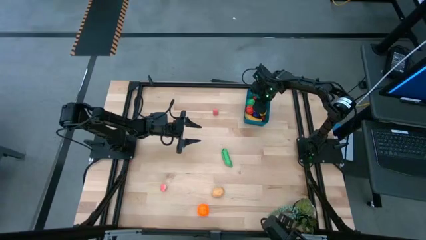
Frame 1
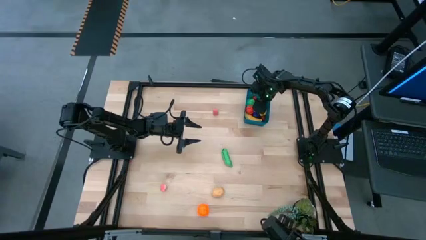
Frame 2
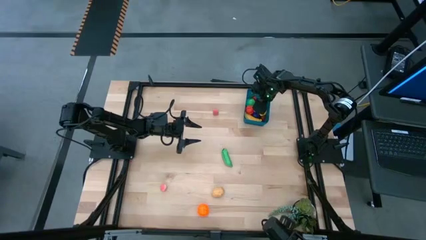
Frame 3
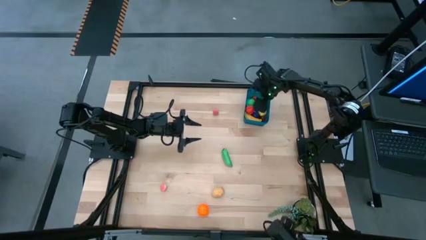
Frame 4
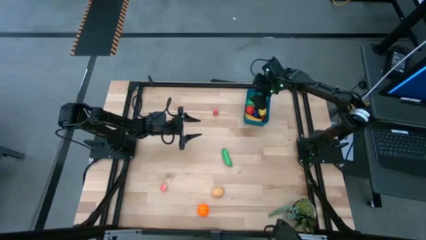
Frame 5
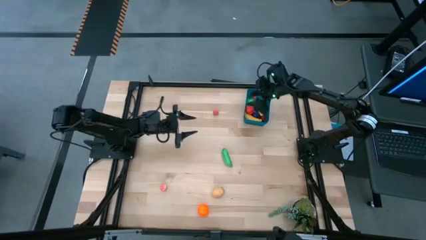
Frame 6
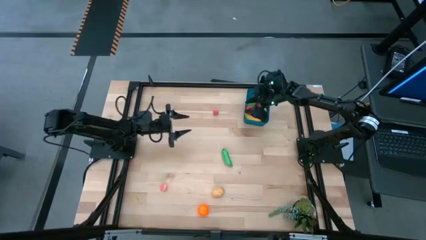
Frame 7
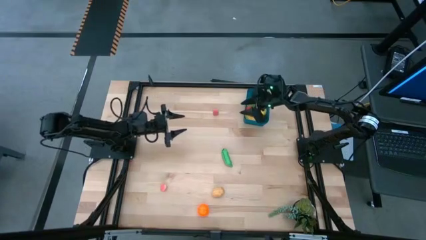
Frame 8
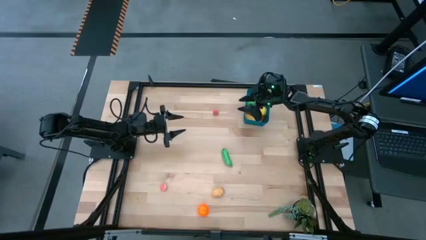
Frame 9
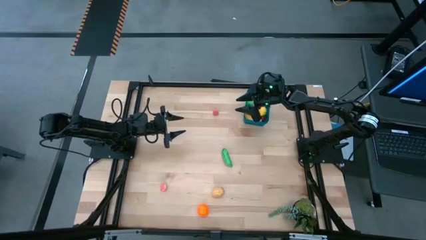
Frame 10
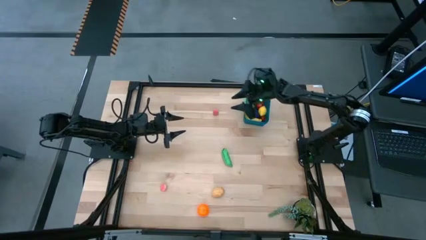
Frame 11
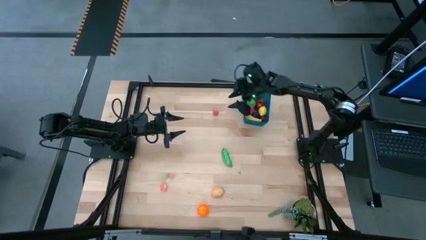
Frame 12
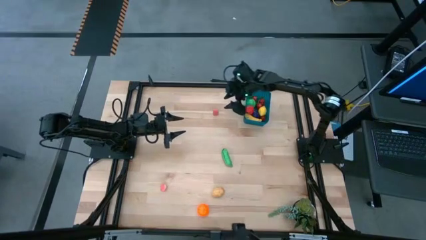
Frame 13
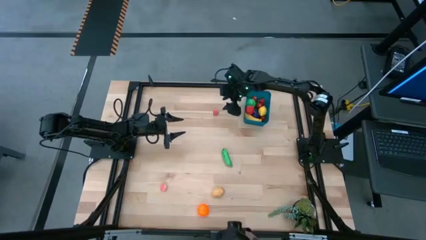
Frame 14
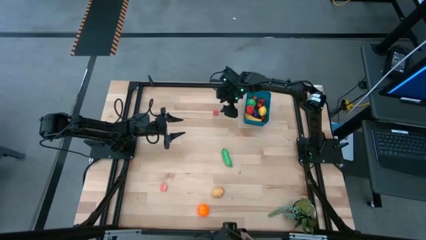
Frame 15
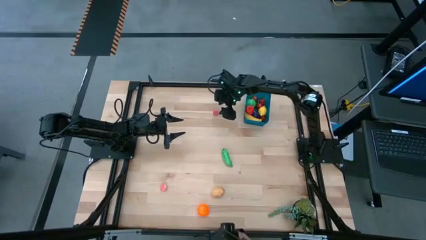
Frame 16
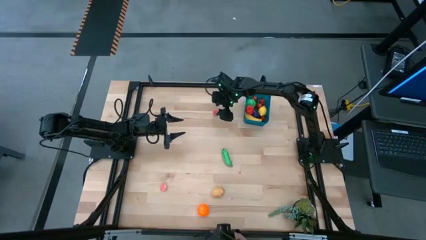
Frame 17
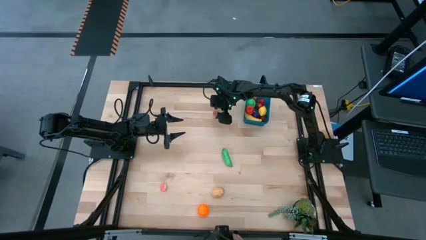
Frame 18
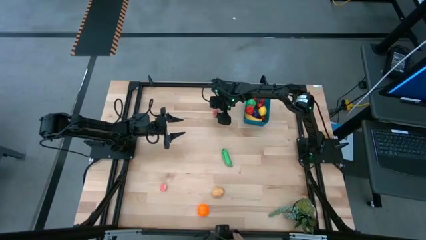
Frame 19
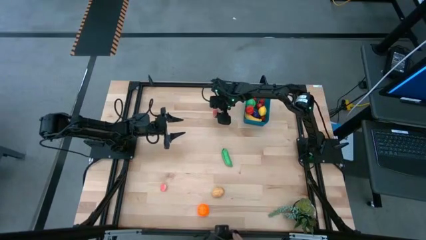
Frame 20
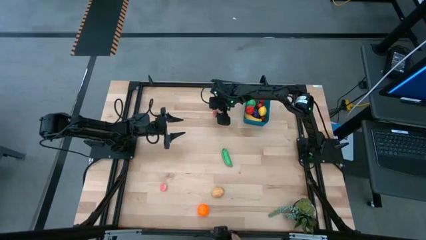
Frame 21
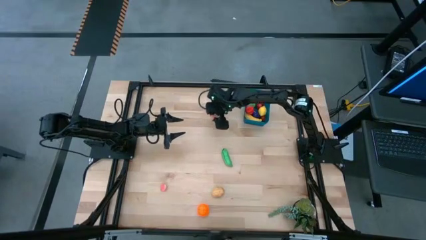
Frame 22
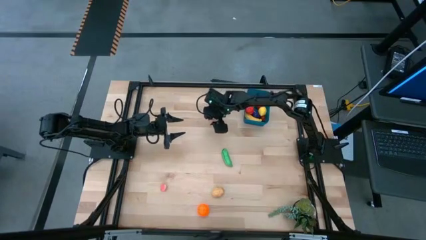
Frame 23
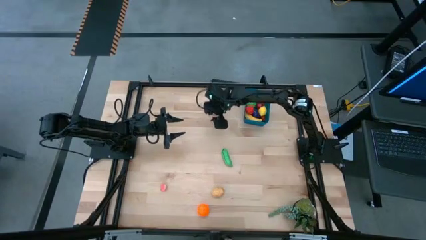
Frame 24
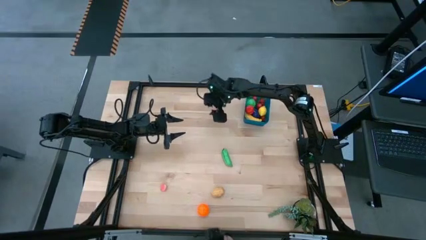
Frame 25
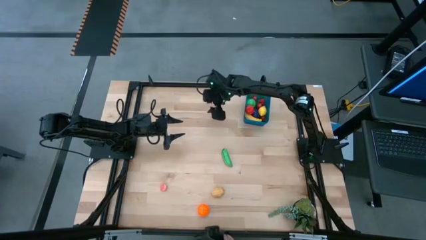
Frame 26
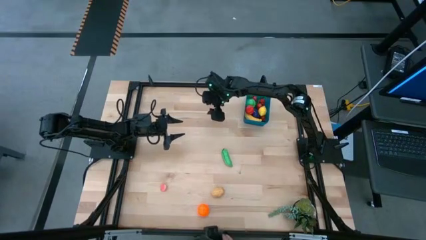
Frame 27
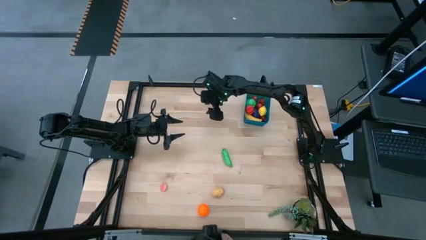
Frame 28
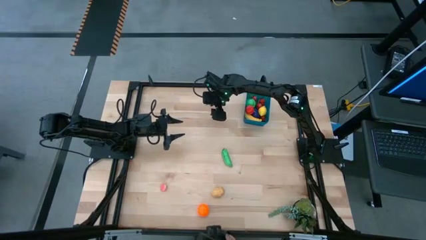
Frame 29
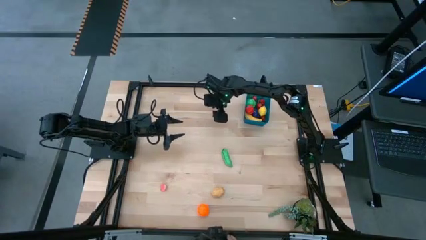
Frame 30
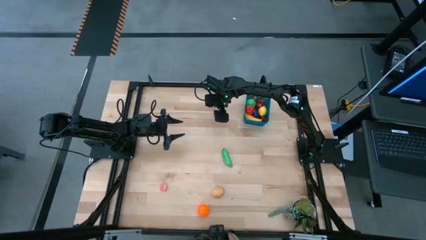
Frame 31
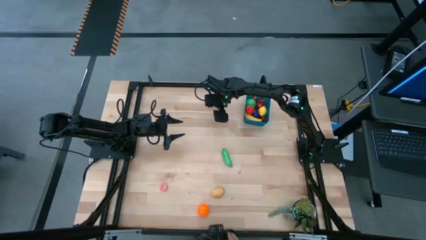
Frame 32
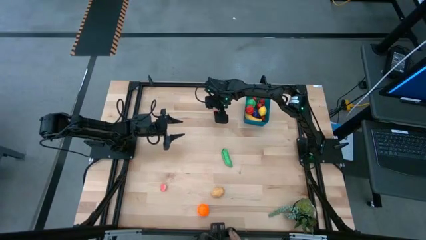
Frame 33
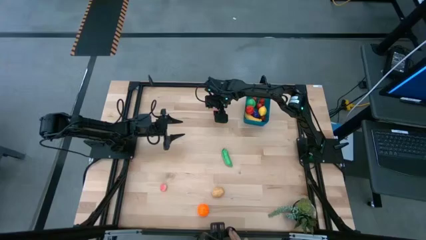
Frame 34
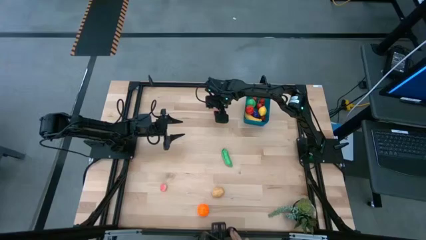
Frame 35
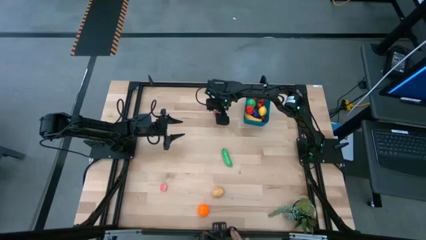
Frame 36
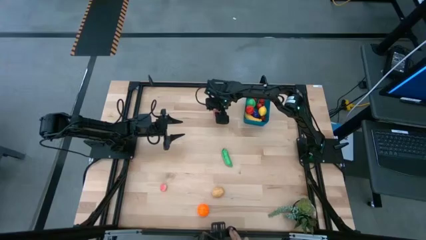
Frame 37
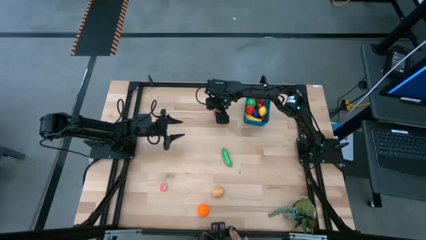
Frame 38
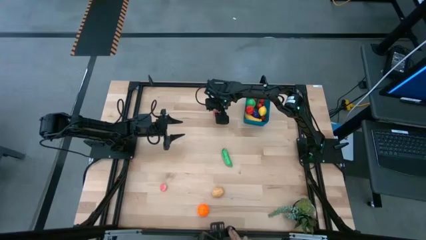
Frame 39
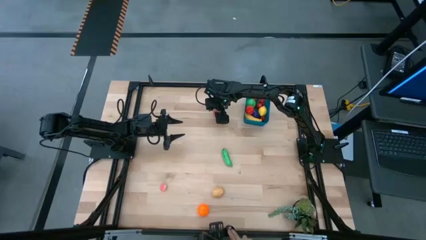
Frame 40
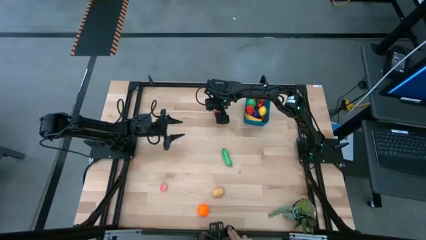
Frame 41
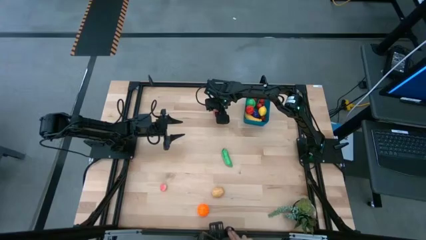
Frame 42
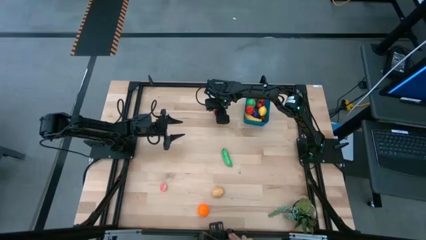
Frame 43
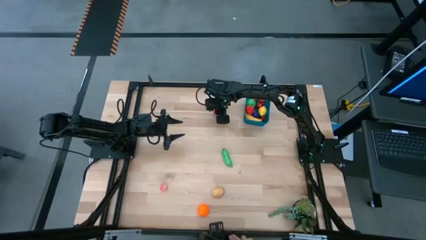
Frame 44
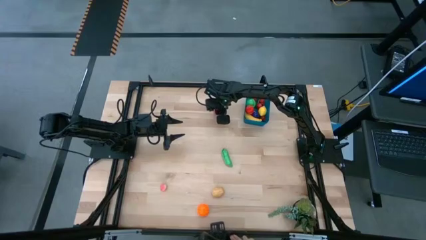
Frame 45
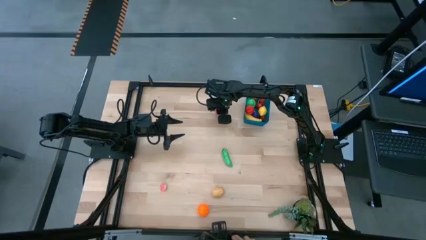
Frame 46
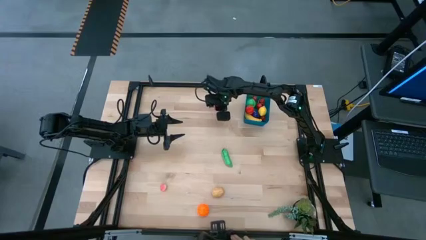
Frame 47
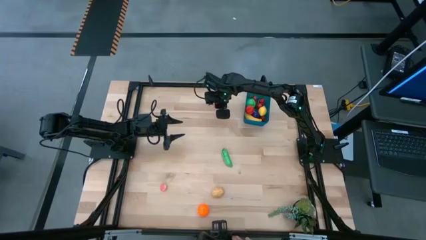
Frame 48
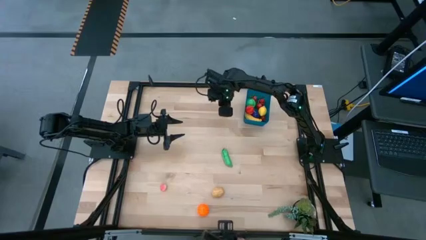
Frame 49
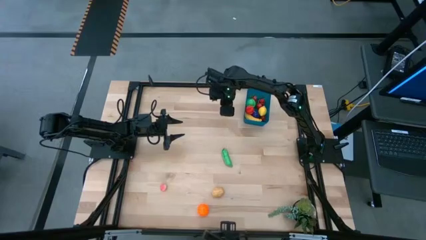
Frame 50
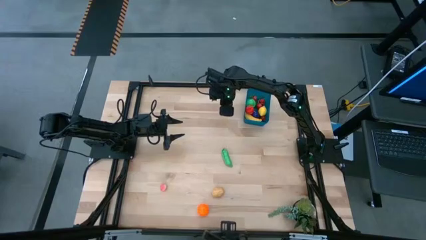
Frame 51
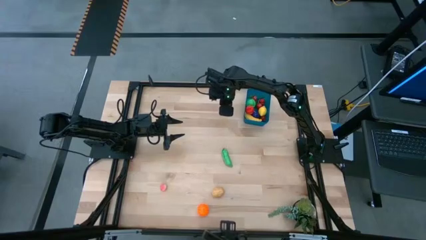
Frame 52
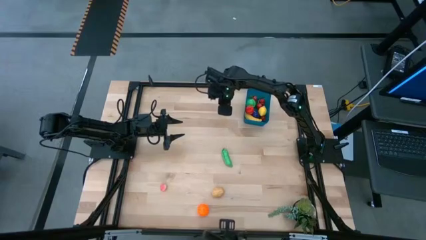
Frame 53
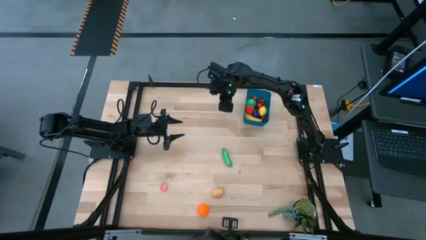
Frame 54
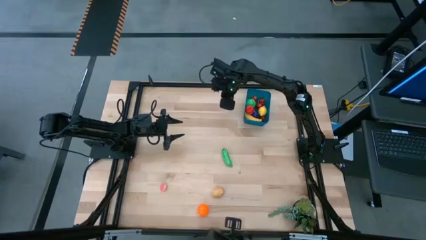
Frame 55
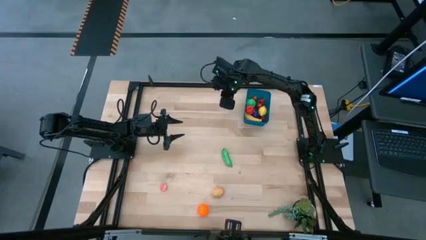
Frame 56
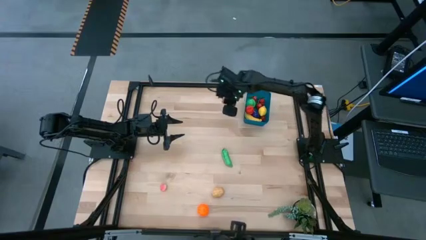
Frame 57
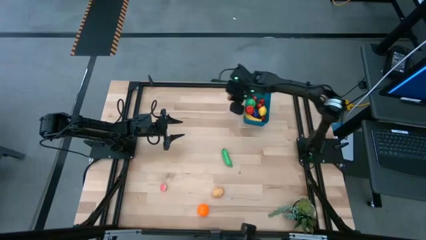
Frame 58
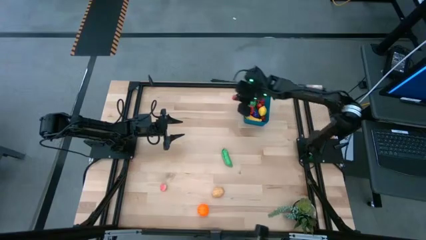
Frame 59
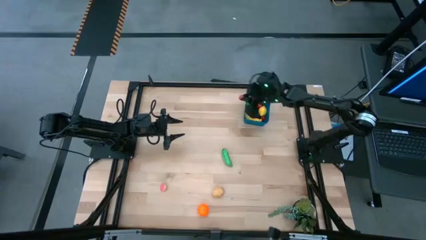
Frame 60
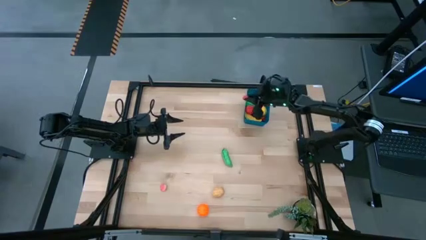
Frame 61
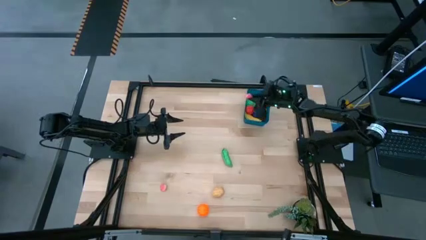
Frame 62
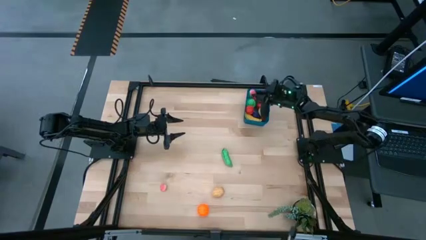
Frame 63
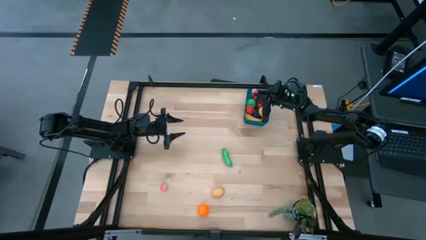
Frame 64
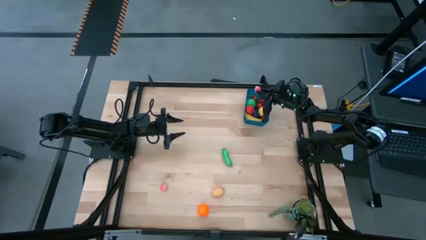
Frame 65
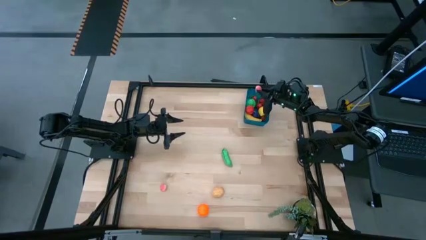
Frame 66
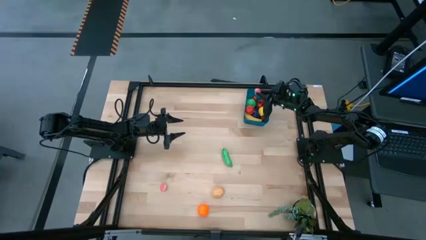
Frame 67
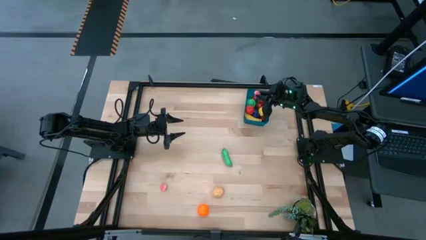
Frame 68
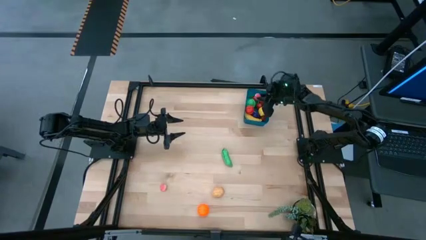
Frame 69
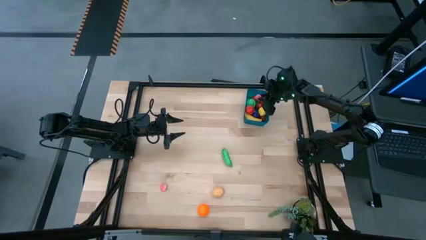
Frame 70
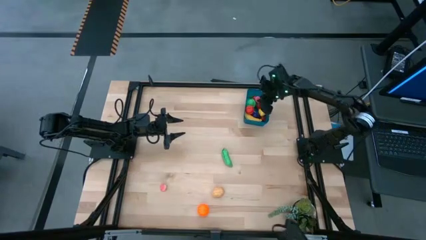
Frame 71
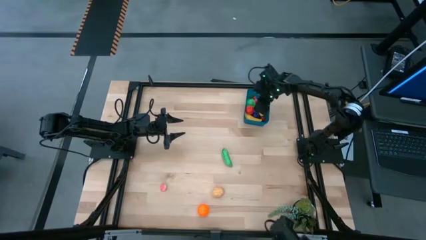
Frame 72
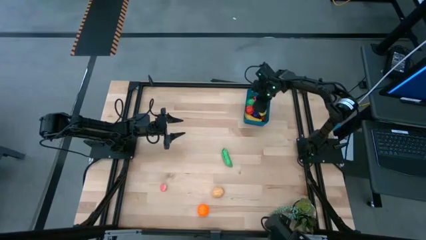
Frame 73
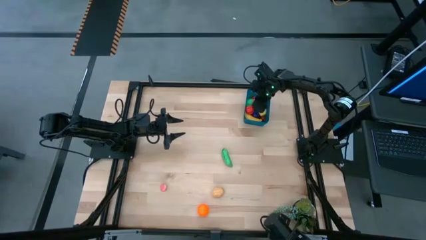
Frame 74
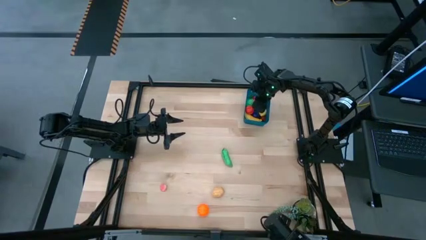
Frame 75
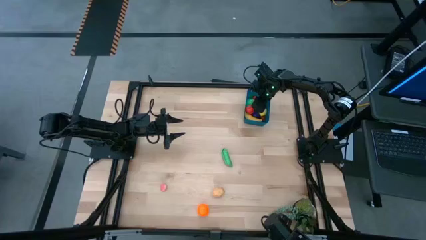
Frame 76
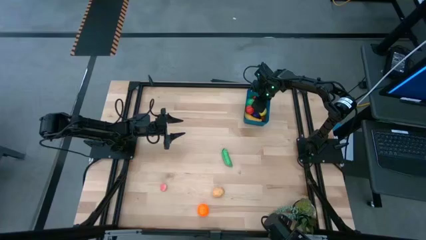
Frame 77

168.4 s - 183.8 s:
Task: Pick and placing Produce into tupperware
Put the pink peach into the blue bin

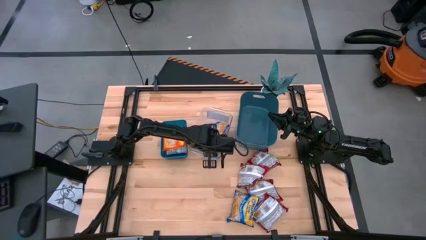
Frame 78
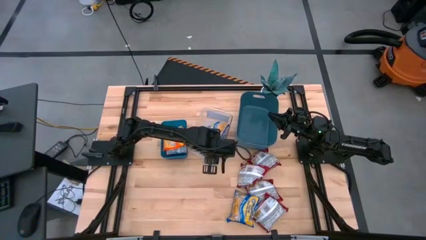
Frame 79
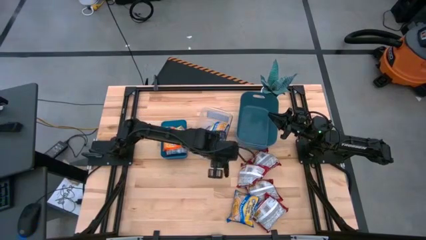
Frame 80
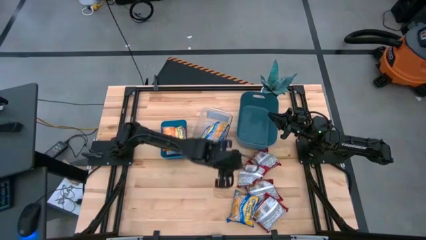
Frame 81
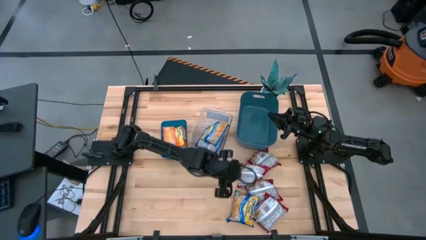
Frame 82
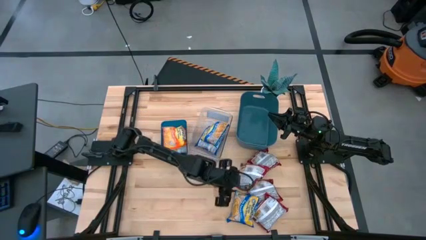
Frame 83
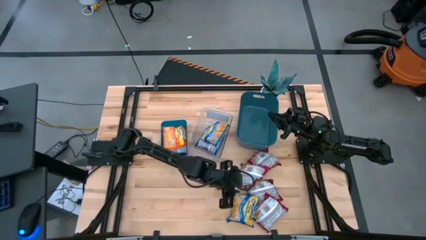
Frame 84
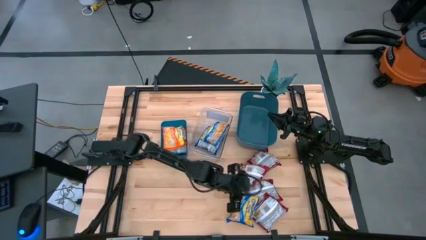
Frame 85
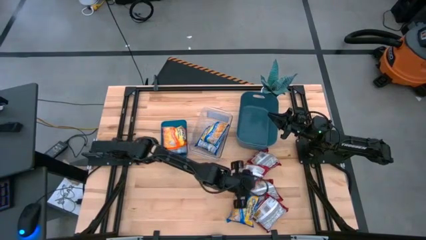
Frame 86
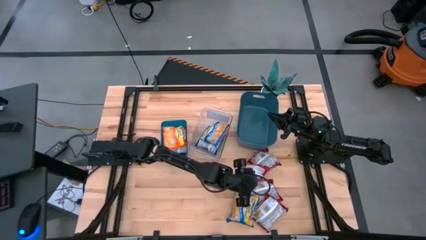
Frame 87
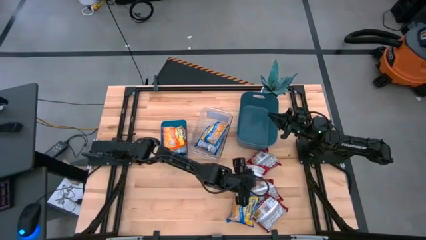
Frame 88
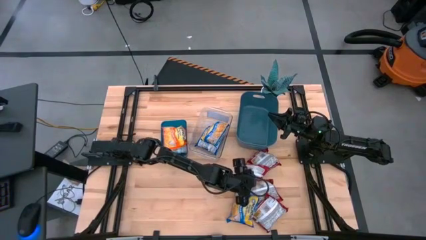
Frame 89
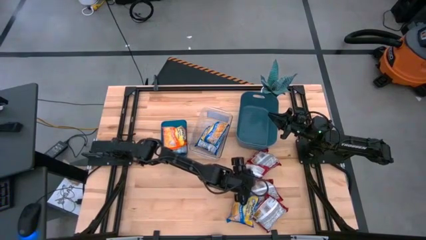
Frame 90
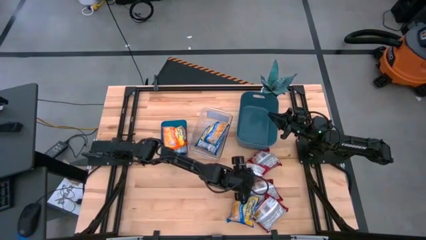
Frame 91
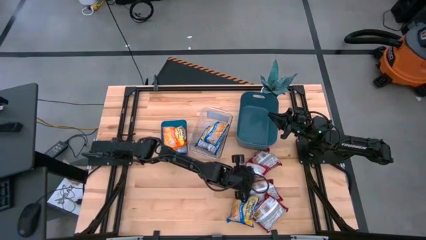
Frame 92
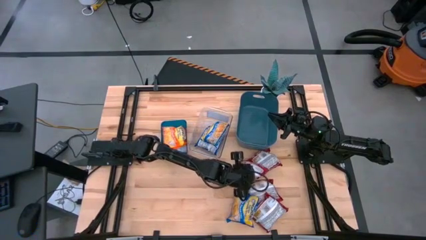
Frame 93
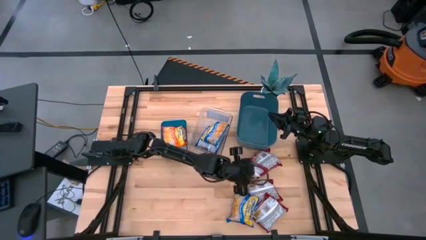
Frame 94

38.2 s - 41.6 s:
Task: Sort Maruchan noodles
Put the red noodle pack into the dark green bin
